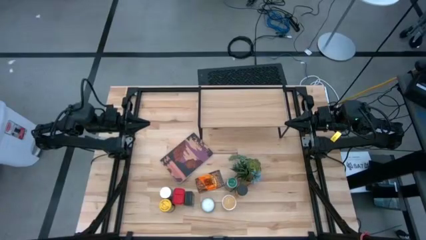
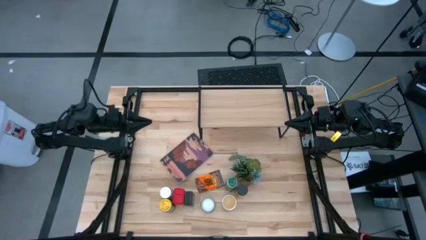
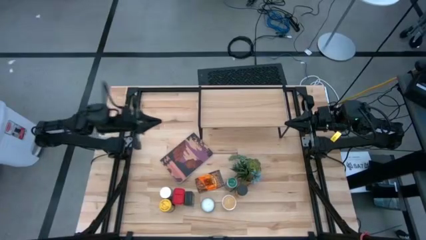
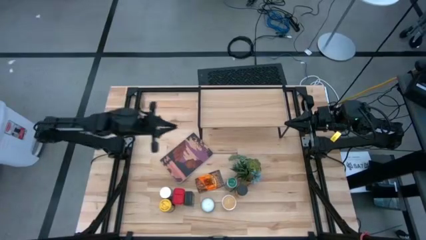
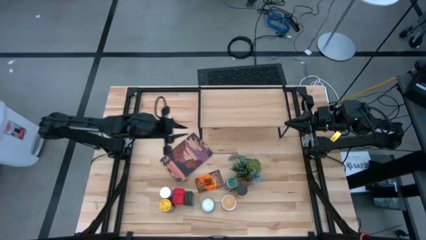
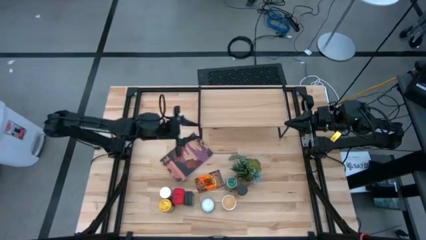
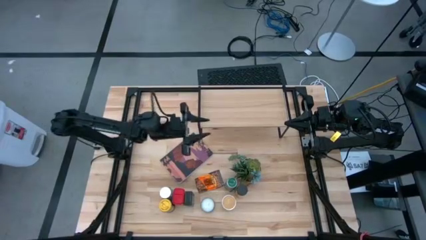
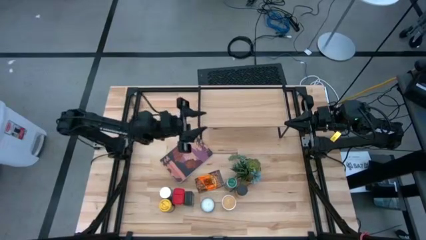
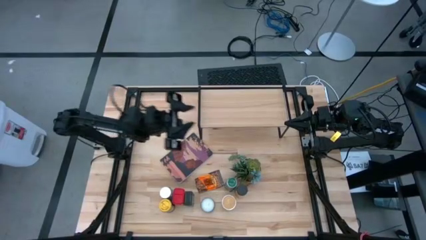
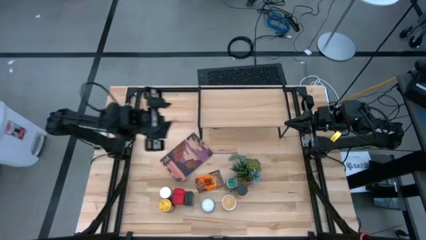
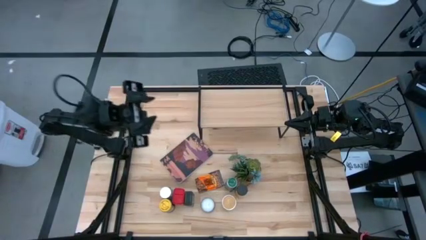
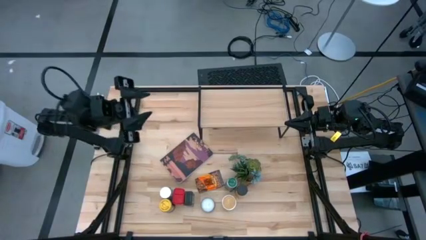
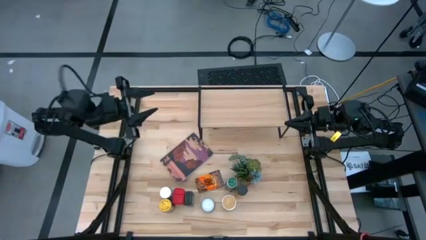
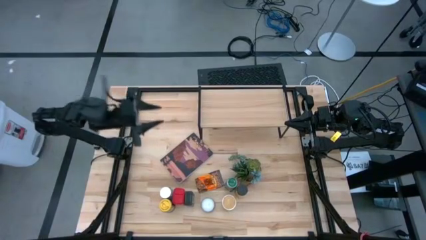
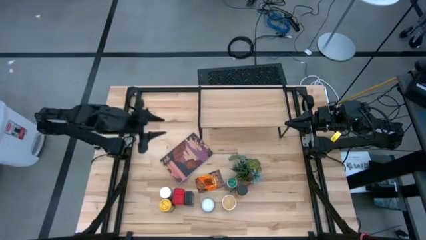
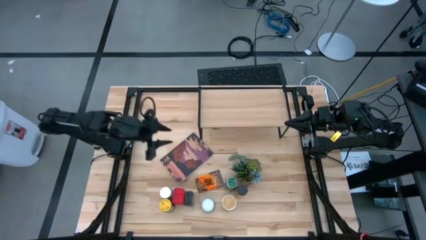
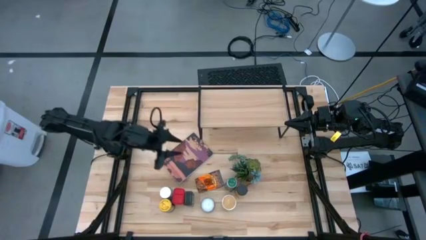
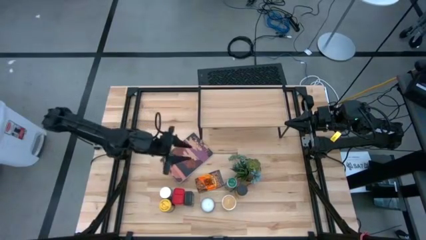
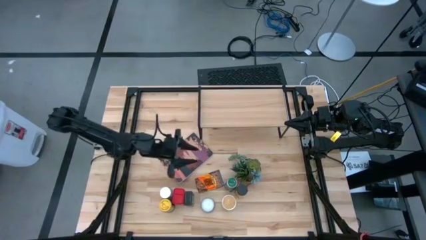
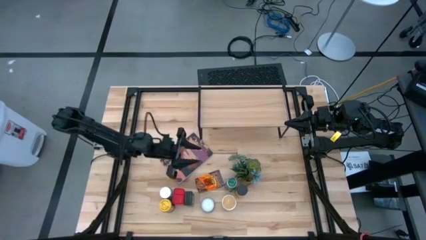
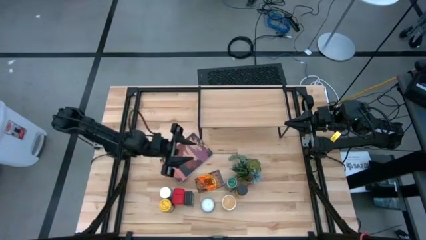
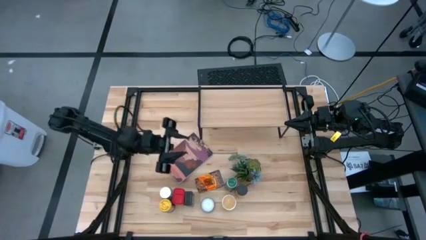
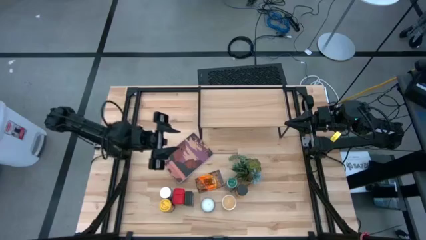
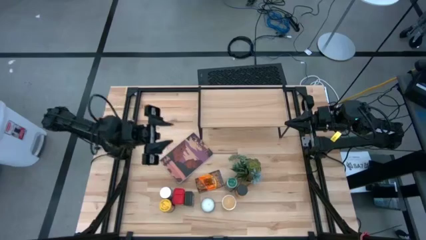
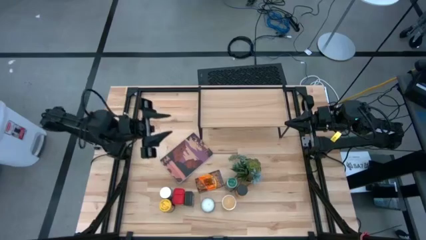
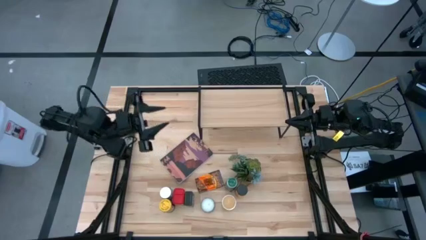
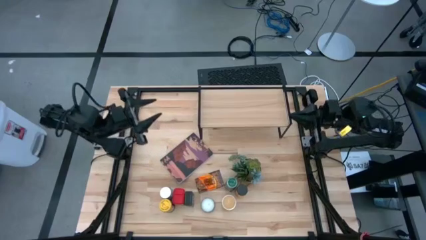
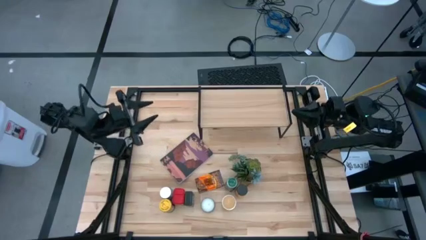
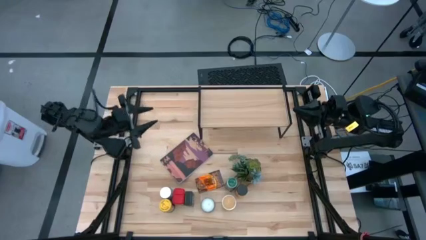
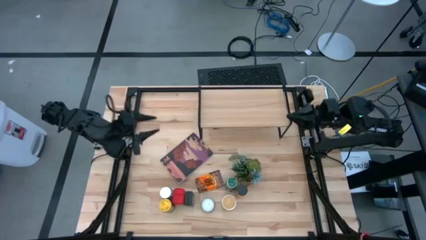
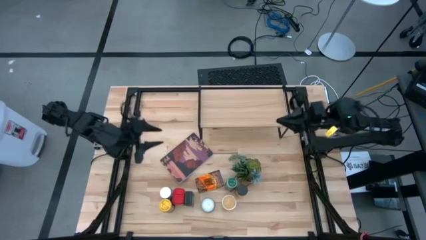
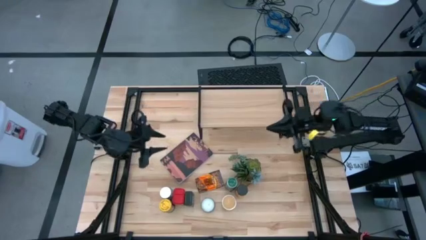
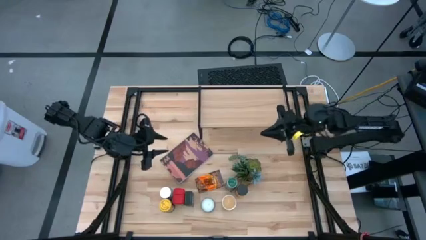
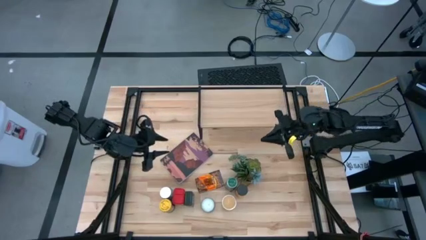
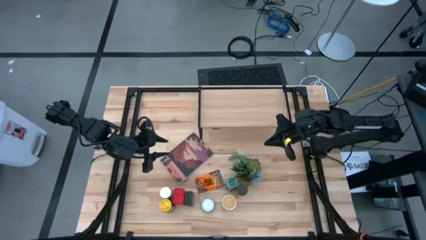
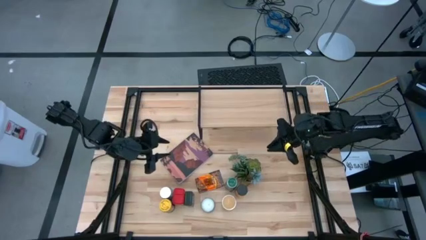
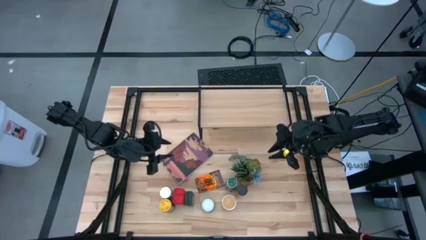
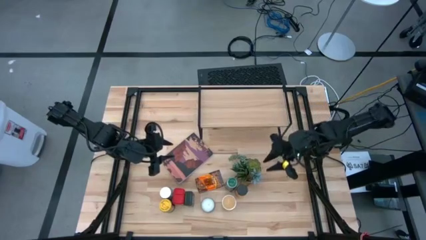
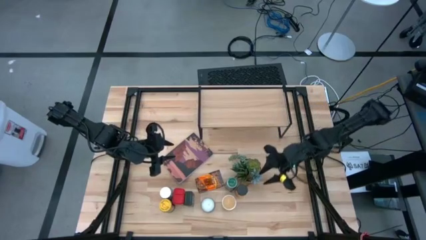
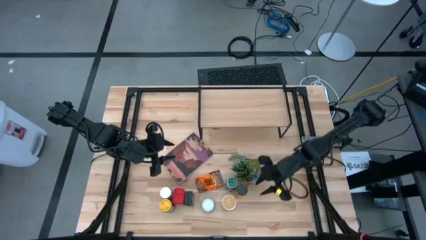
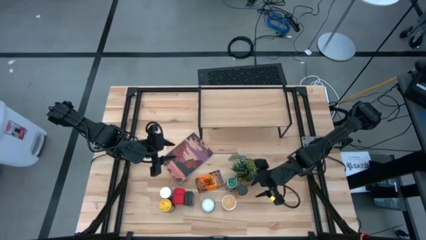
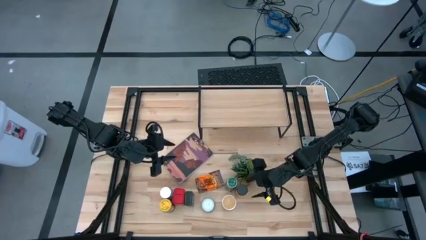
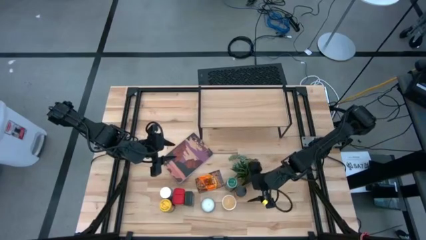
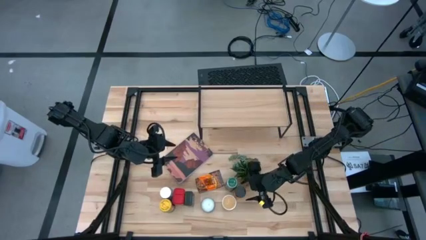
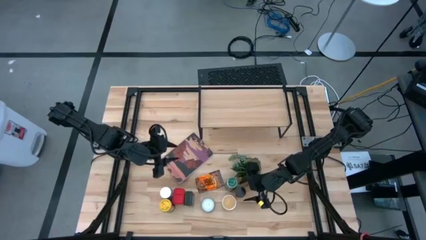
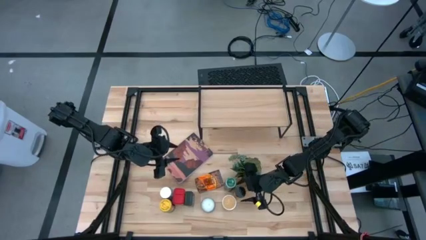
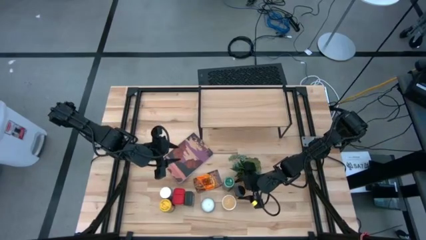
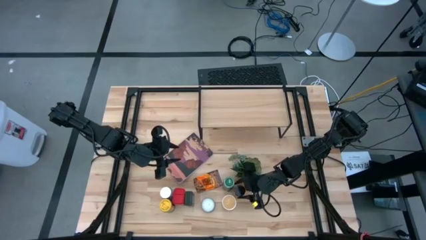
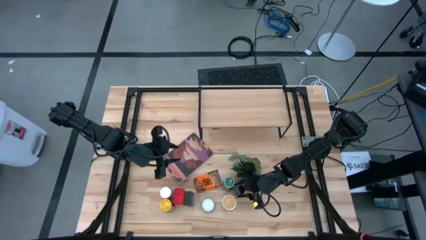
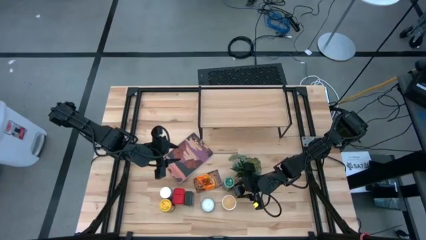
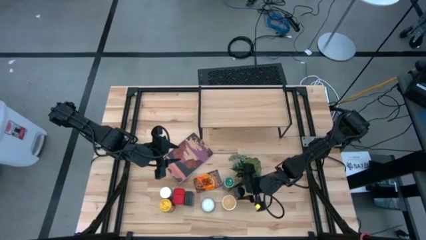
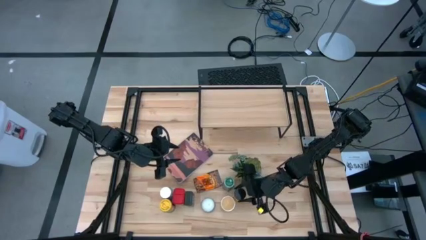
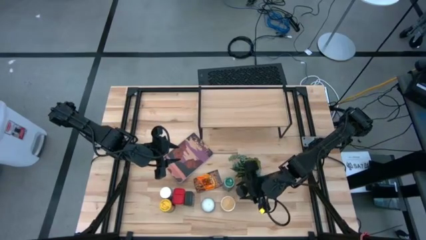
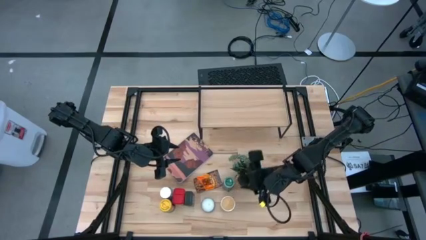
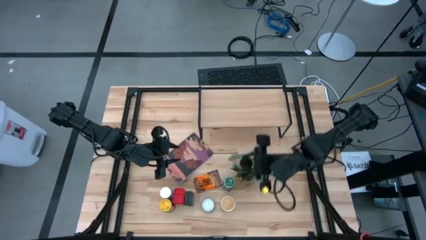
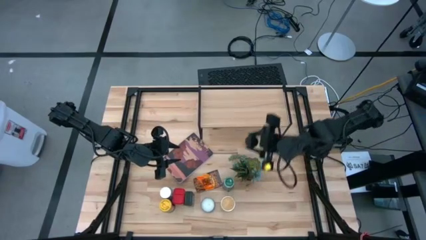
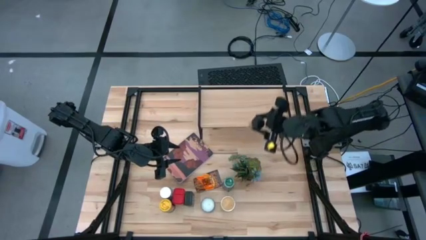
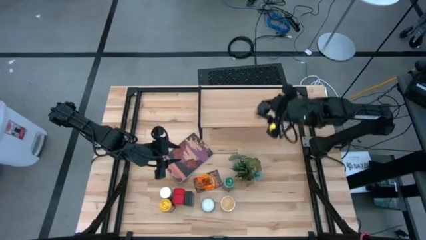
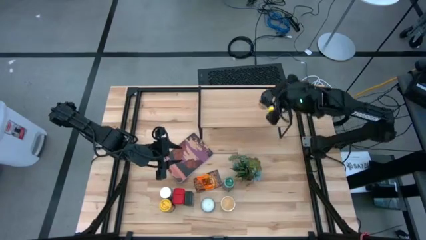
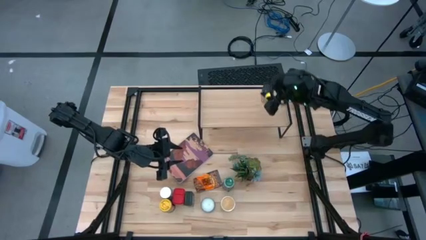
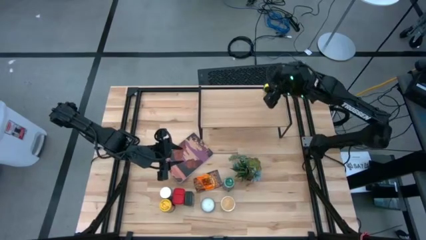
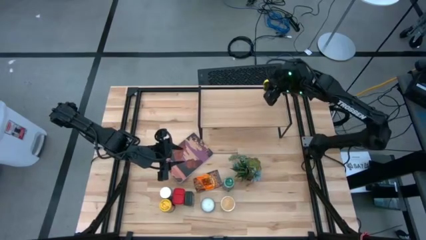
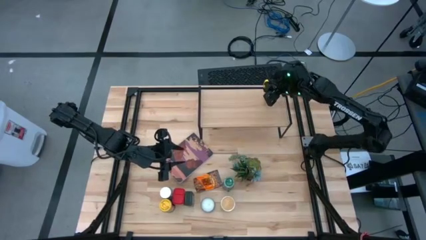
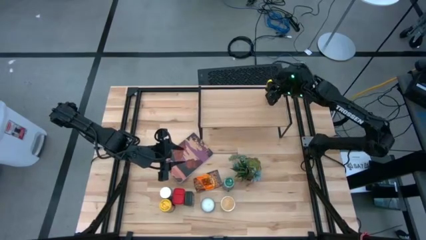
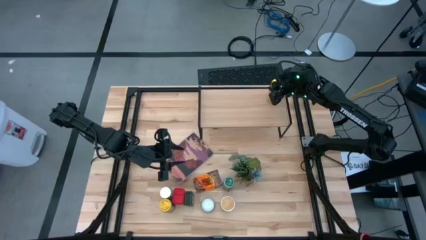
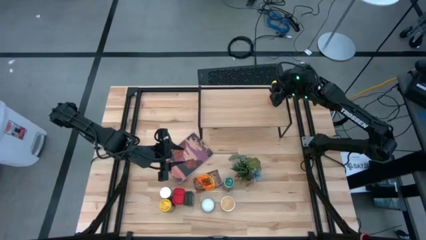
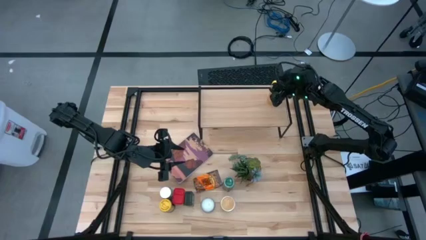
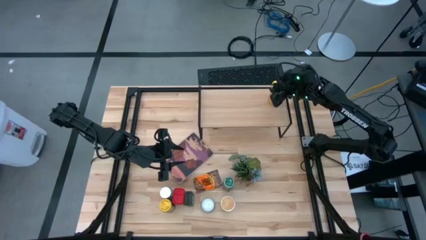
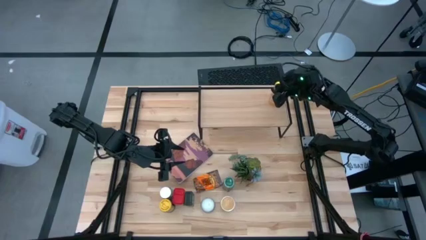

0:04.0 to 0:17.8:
Task: Shelf spices
Put the orange seasoning bottle on the shelf
